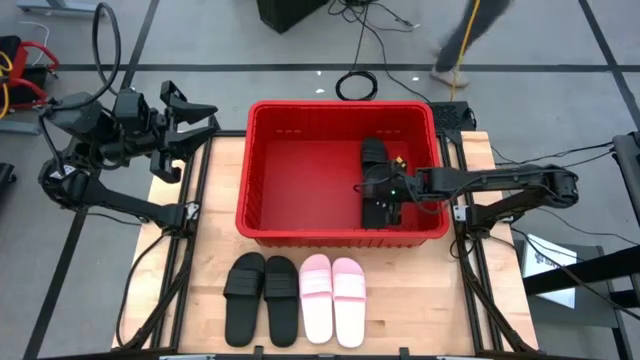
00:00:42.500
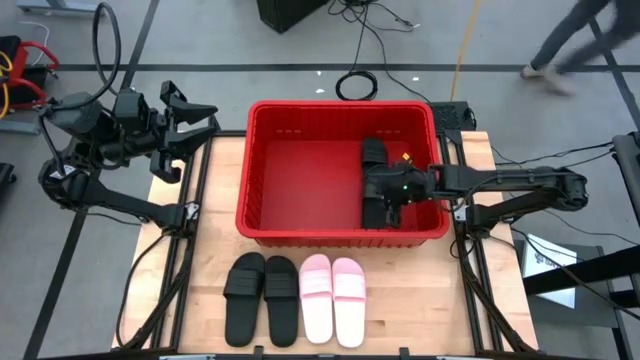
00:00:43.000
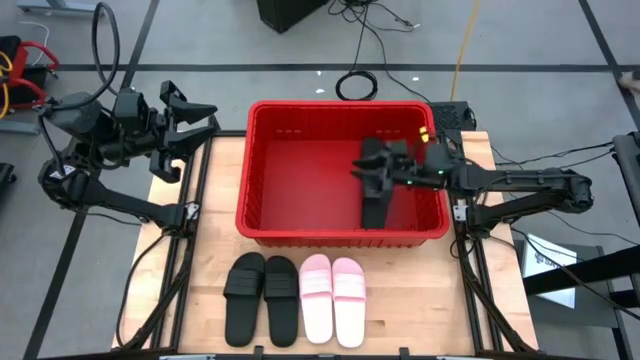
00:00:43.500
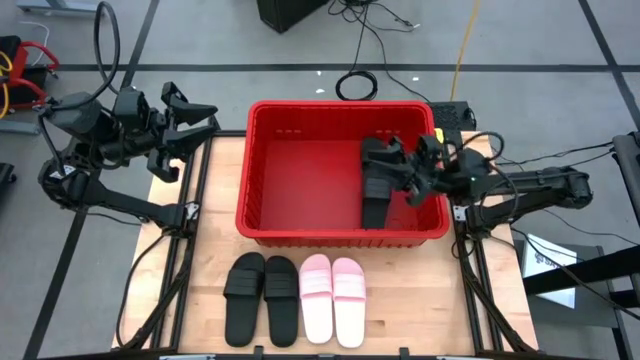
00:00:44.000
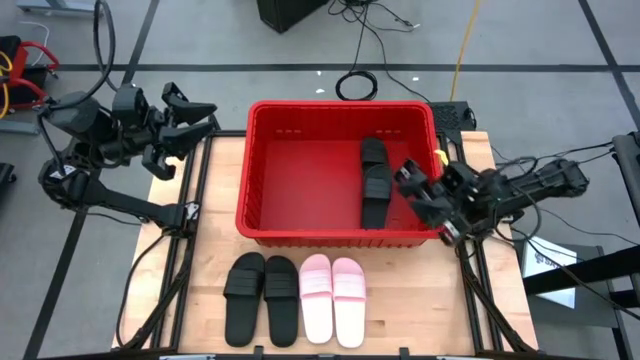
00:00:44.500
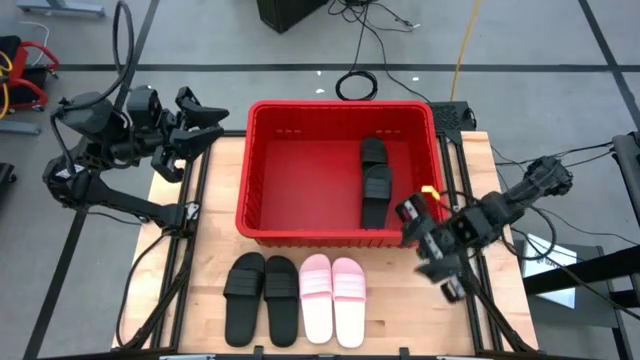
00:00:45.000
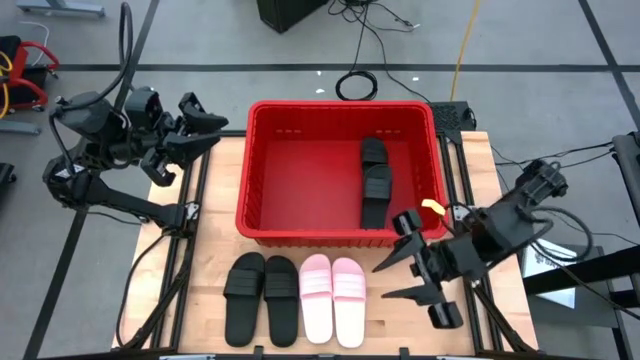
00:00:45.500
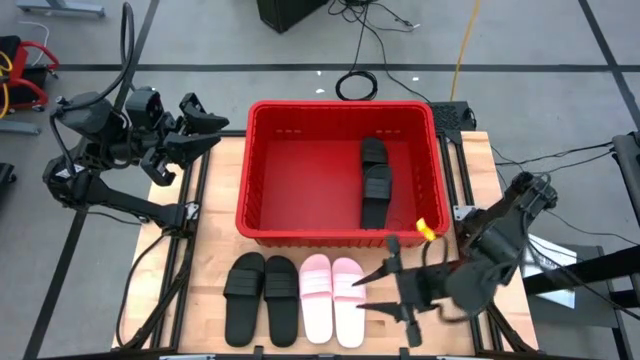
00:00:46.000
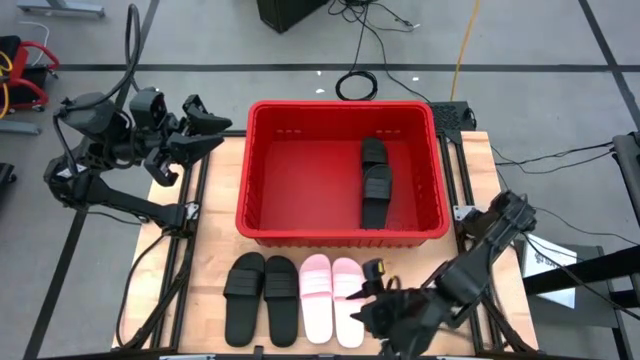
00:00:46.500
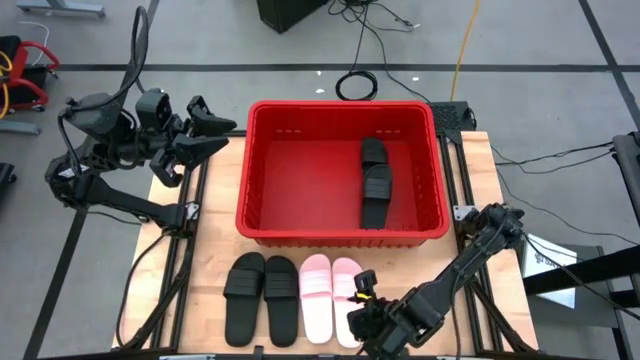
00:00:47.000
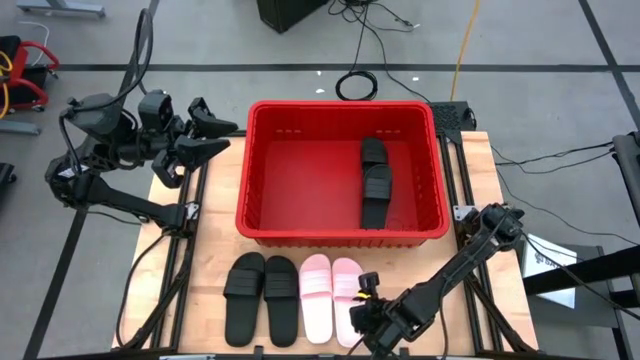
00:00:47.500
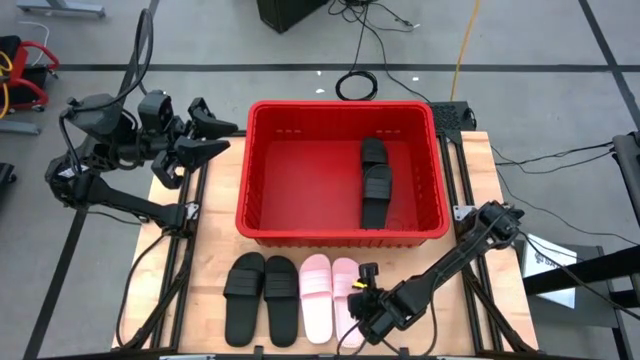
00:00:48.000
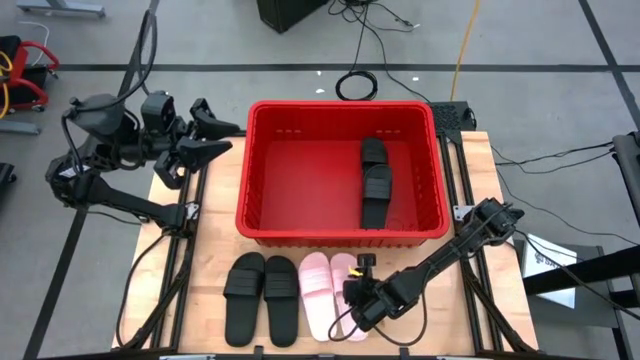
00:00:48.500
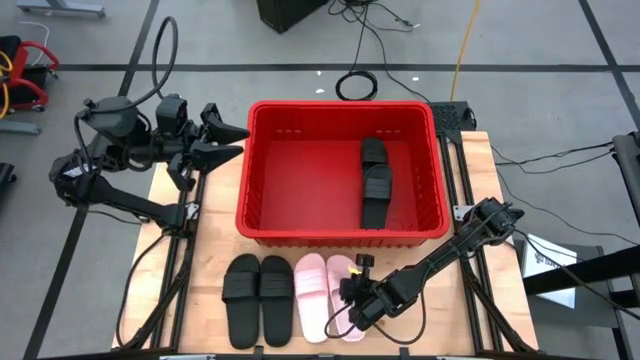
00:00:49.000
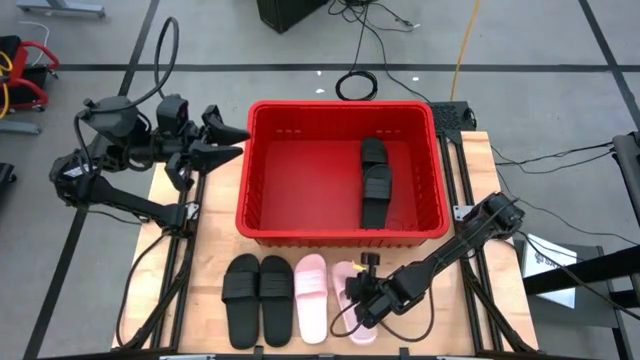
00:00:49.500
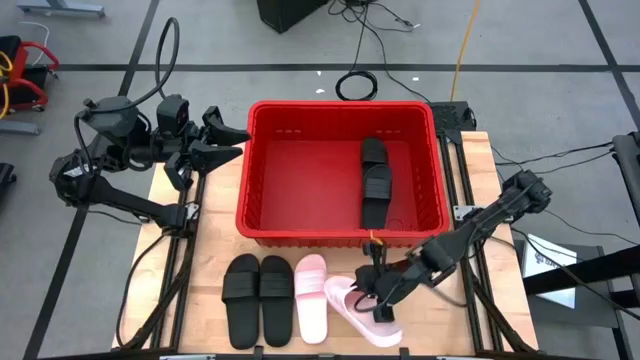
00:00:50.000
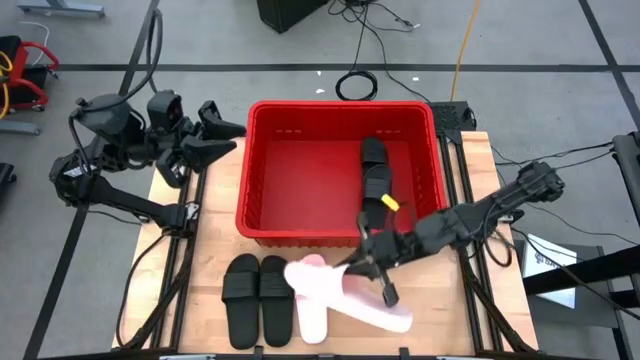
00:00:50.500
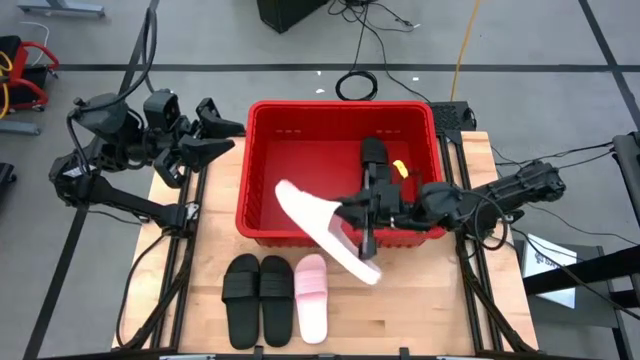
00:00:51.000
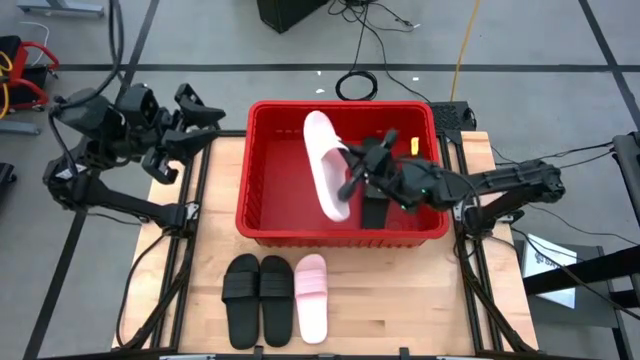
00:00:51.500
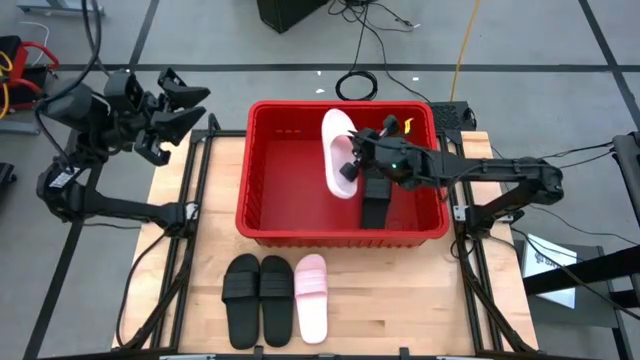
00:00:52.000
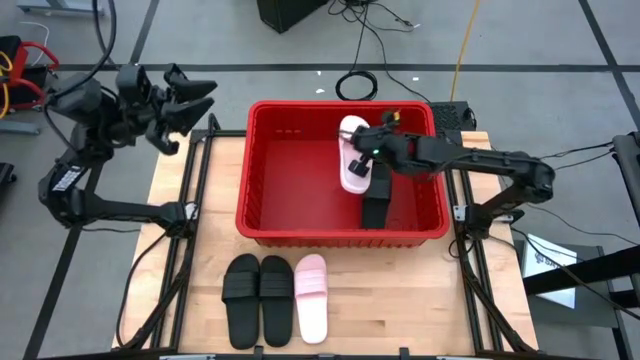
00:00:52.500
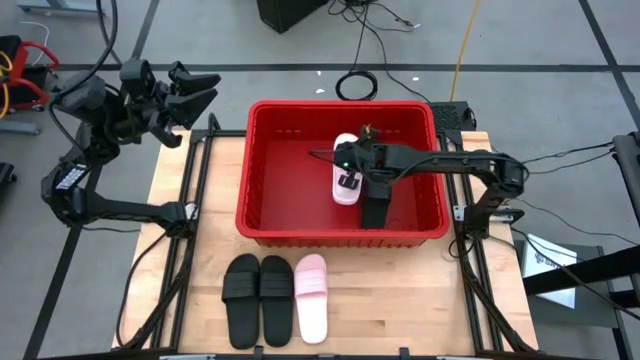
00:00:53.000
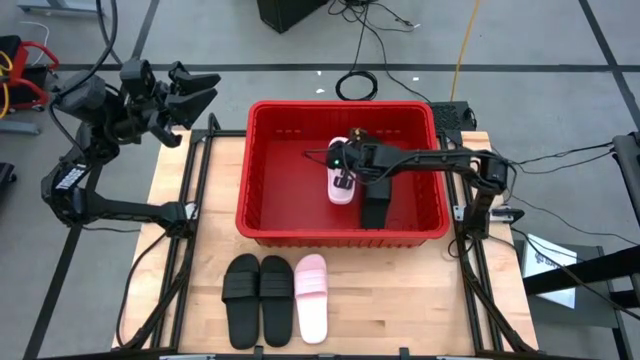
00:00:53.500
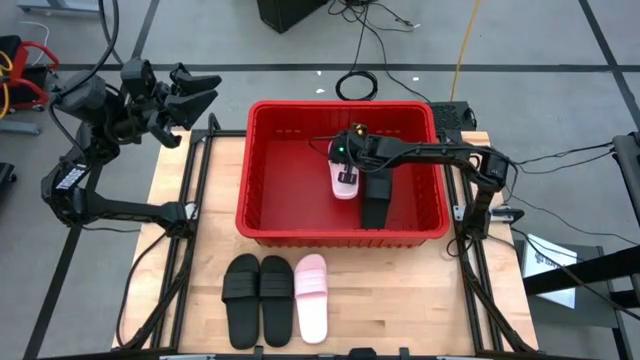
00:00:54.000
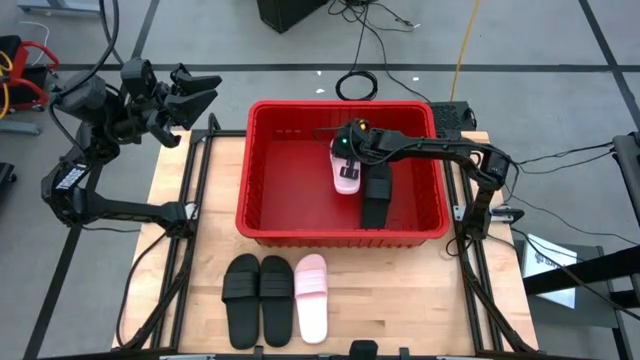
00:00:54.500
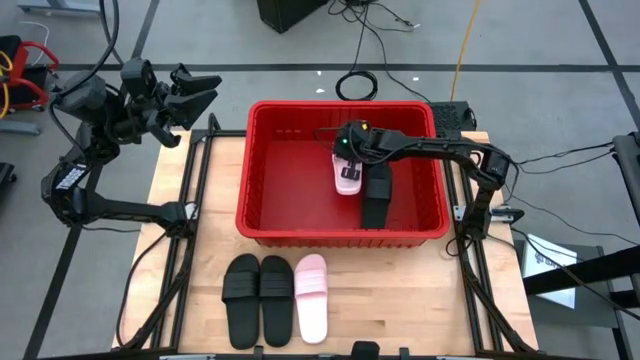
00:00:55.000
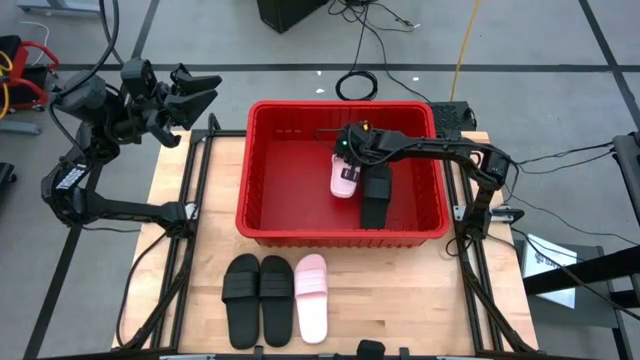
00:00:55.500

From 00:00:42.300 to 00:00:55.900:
Task: Pick and place slides into bin
Put the pink slide into the red bin

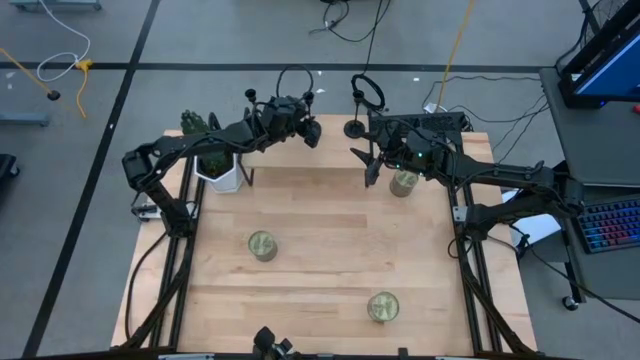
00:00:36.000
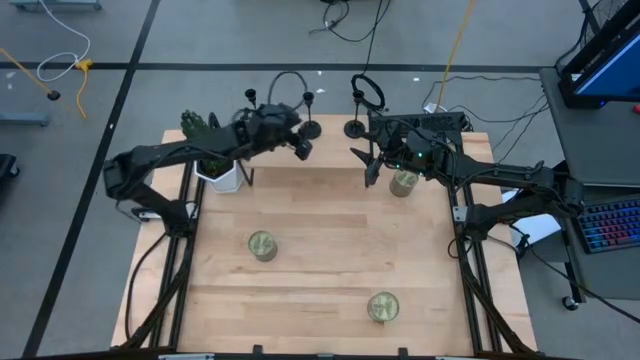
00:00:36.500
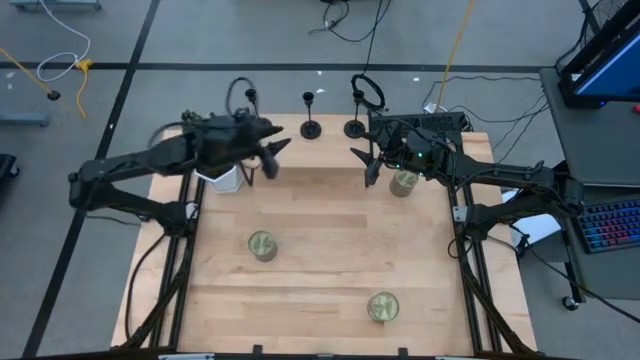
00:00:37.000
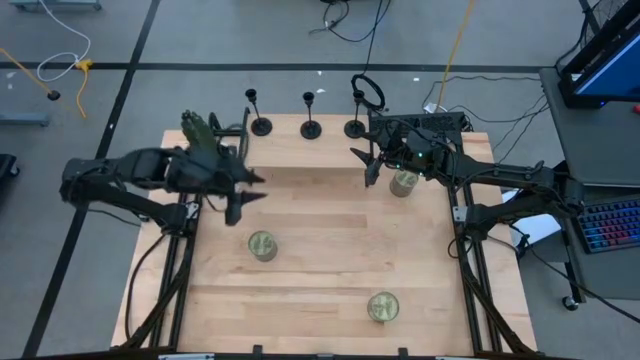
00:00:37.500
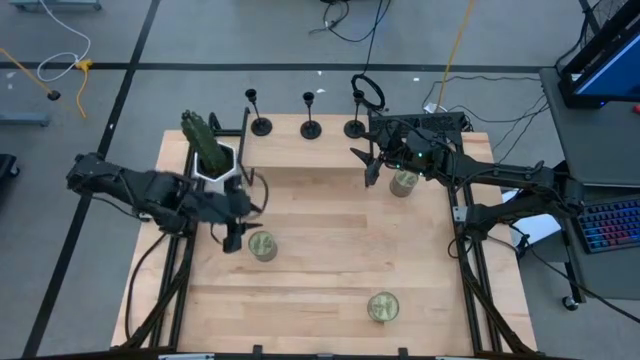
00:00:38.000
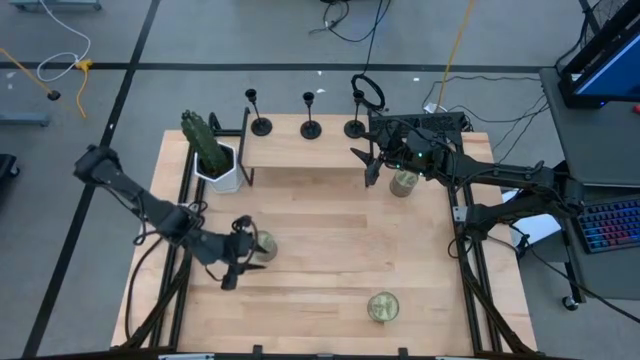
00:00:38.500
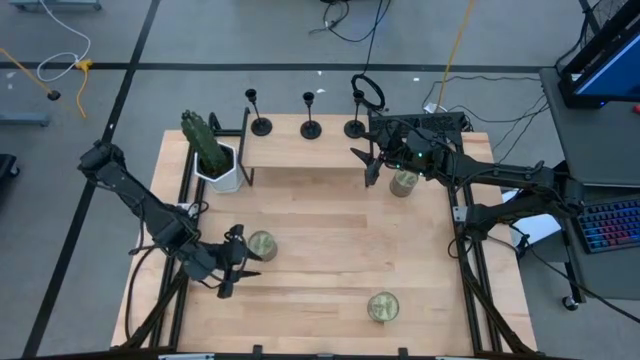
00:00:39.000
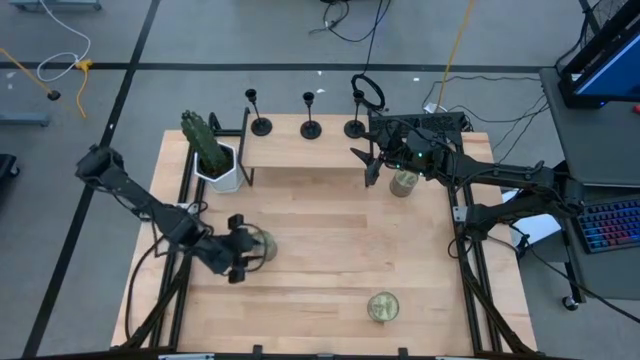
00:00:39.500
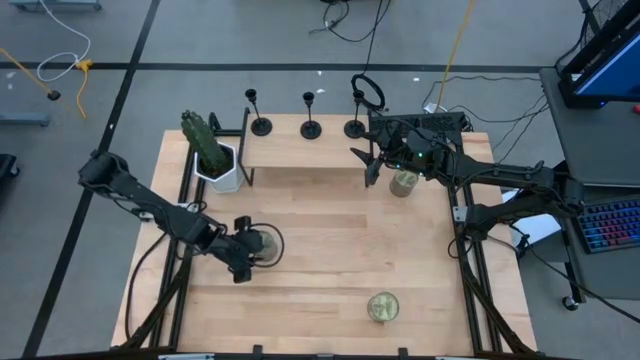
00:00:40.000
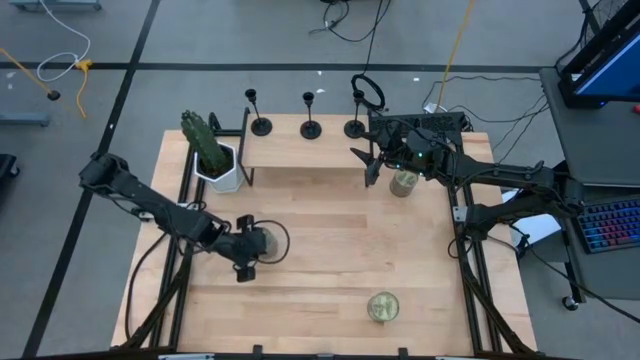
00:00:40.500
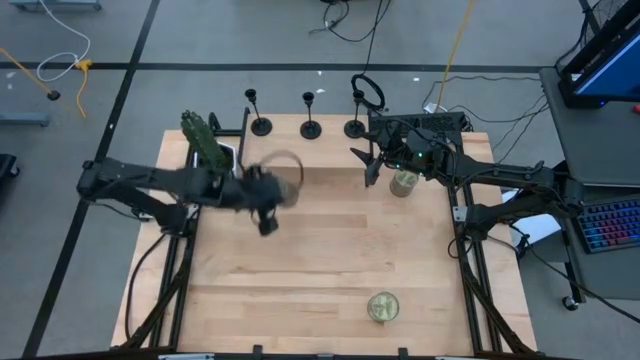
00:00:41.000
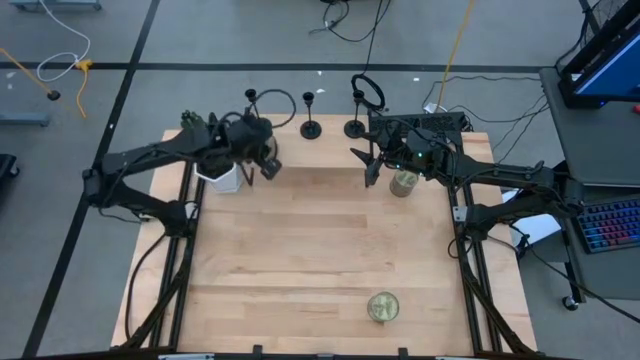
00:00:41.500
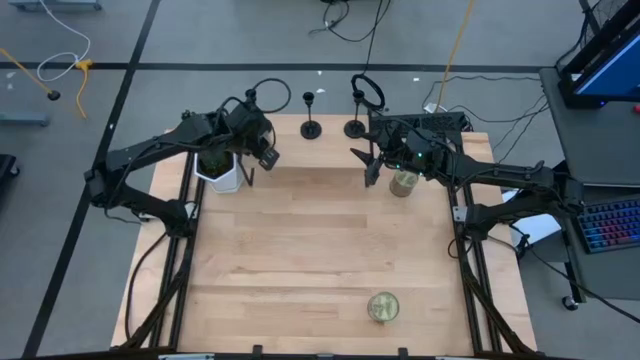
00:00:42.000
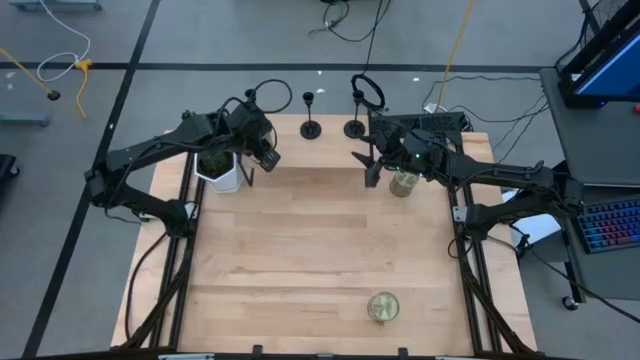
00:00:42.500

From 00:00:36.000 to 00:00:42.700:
Task: Pick & Place candle stick holders
Put the middle left white scented candle on the shelf
